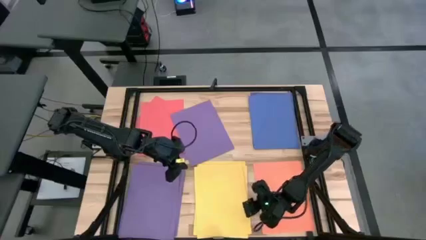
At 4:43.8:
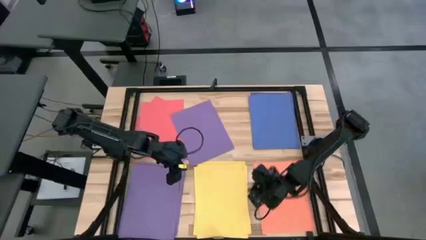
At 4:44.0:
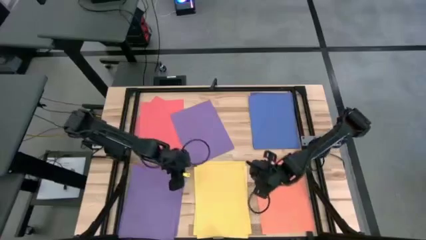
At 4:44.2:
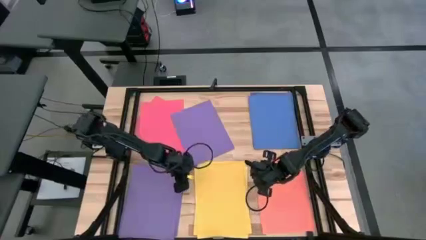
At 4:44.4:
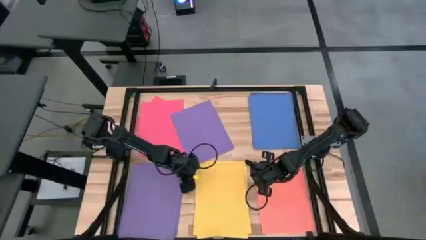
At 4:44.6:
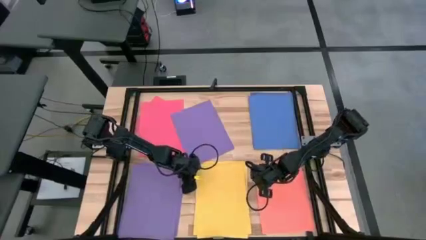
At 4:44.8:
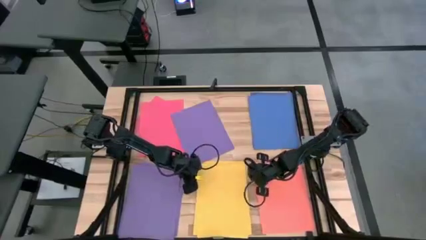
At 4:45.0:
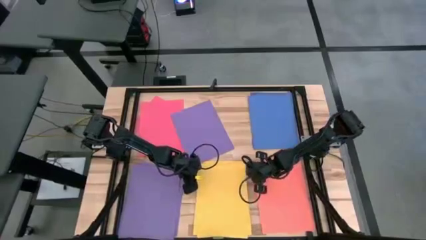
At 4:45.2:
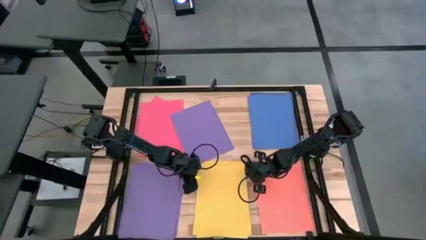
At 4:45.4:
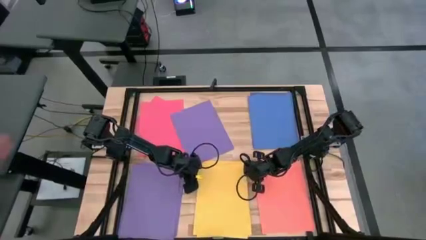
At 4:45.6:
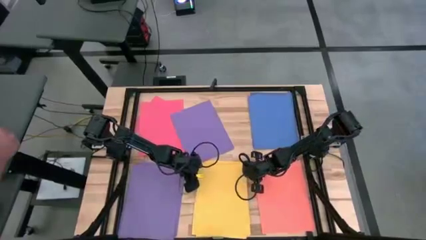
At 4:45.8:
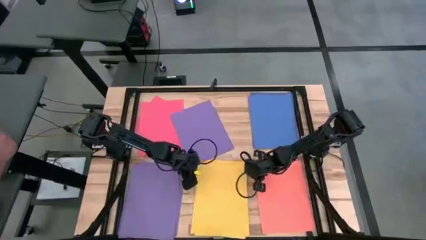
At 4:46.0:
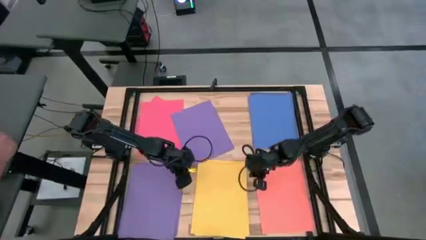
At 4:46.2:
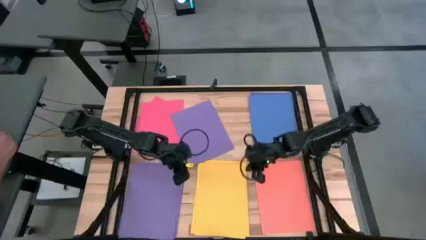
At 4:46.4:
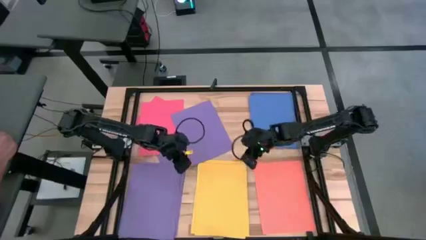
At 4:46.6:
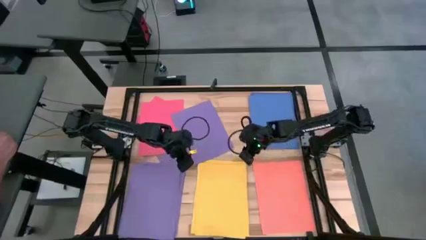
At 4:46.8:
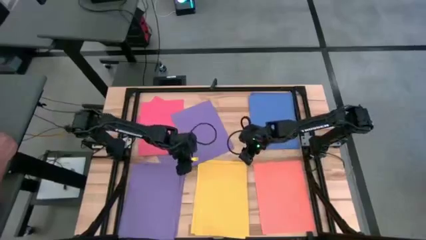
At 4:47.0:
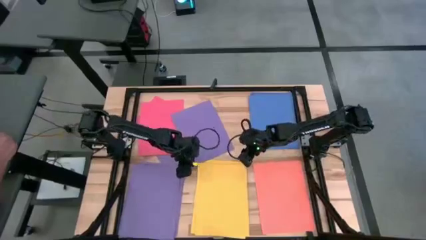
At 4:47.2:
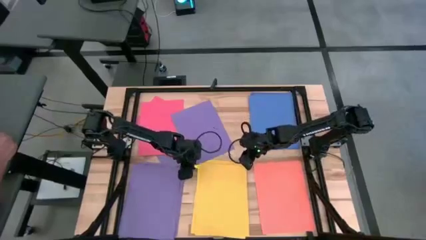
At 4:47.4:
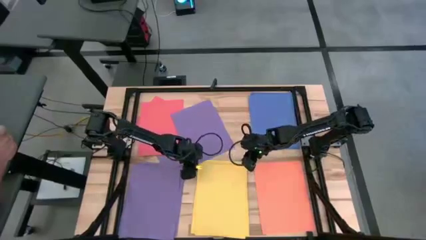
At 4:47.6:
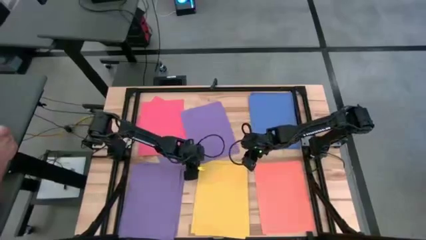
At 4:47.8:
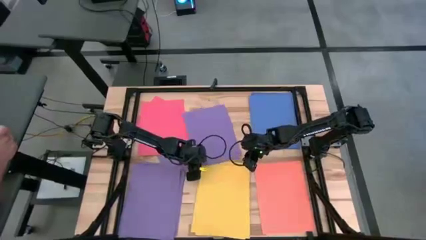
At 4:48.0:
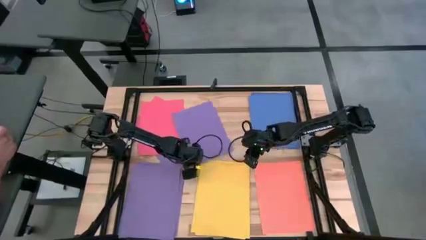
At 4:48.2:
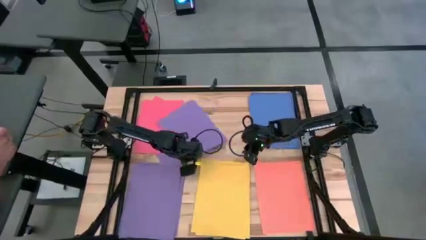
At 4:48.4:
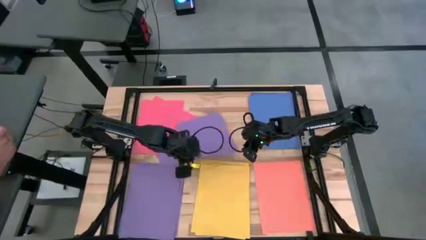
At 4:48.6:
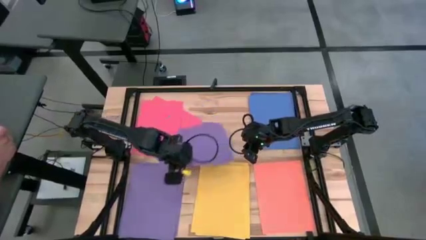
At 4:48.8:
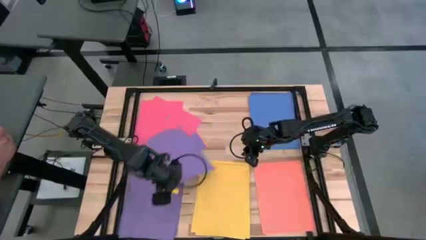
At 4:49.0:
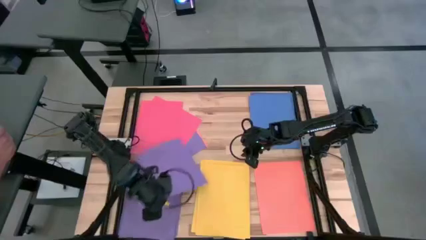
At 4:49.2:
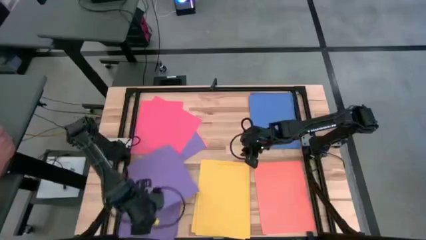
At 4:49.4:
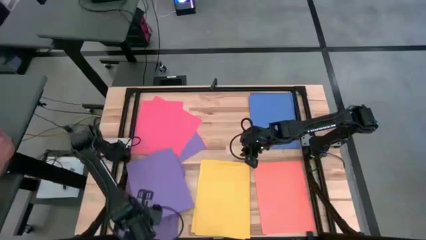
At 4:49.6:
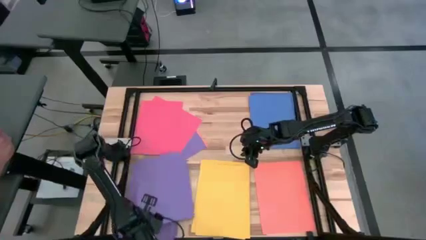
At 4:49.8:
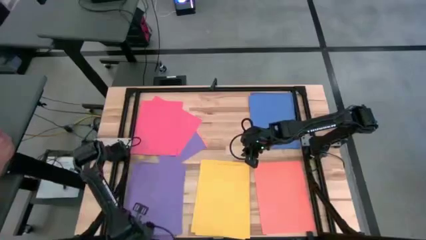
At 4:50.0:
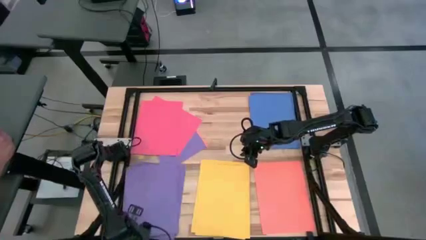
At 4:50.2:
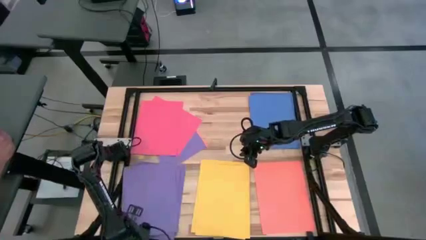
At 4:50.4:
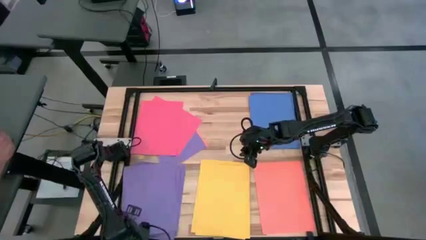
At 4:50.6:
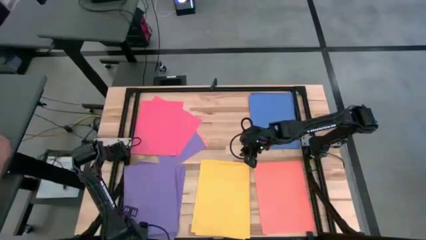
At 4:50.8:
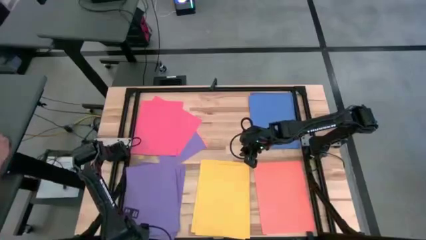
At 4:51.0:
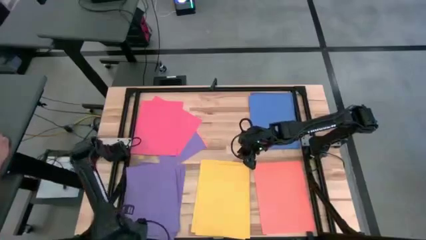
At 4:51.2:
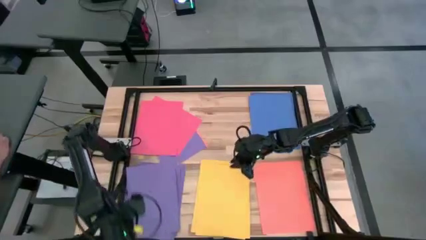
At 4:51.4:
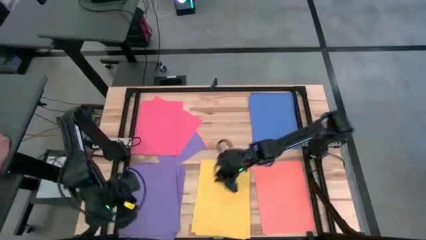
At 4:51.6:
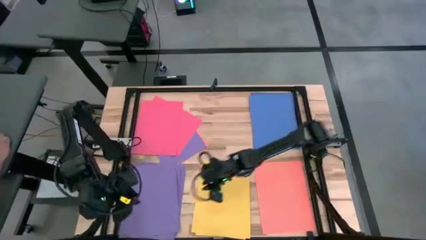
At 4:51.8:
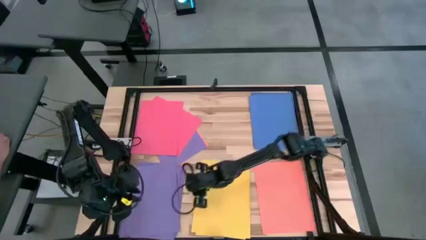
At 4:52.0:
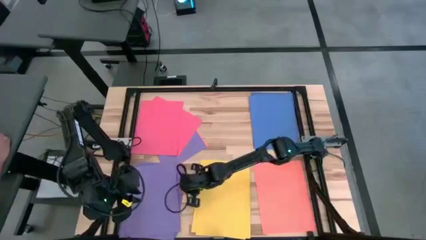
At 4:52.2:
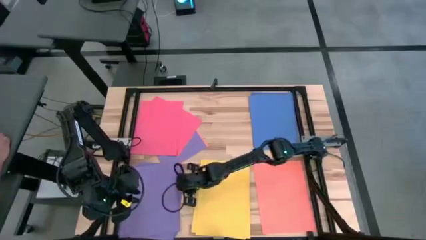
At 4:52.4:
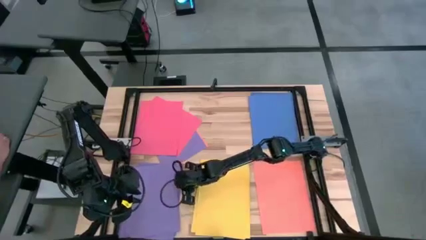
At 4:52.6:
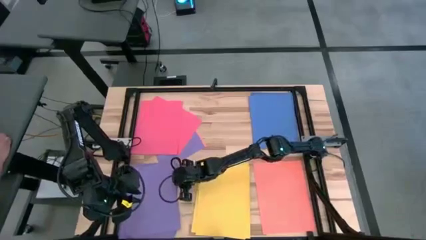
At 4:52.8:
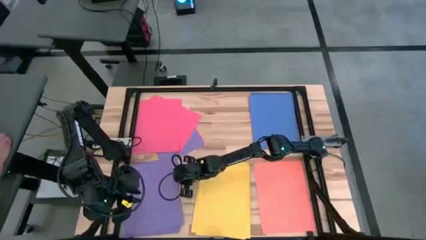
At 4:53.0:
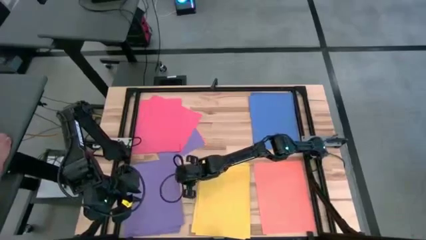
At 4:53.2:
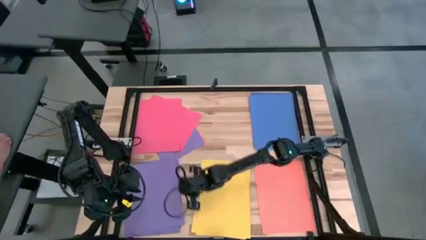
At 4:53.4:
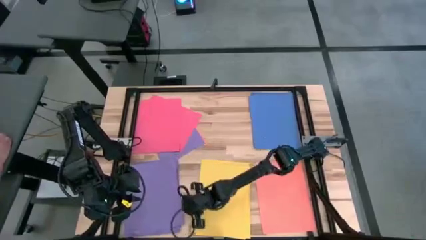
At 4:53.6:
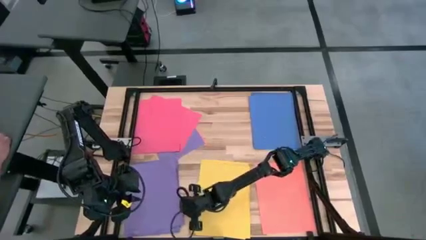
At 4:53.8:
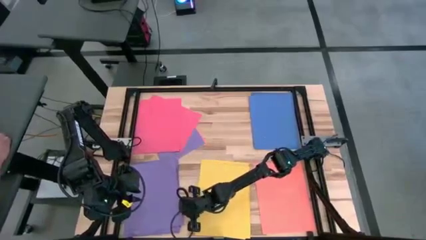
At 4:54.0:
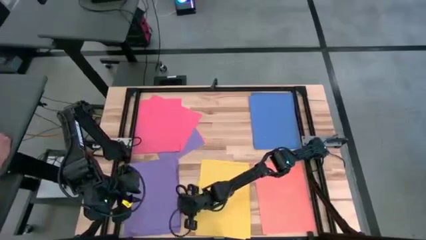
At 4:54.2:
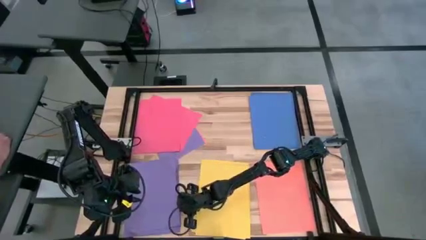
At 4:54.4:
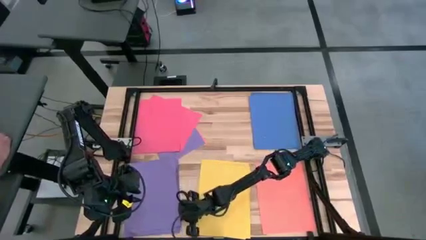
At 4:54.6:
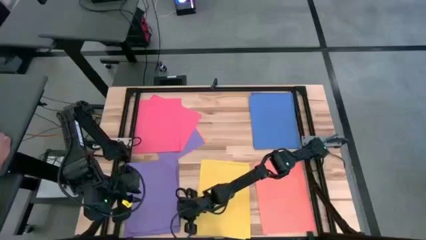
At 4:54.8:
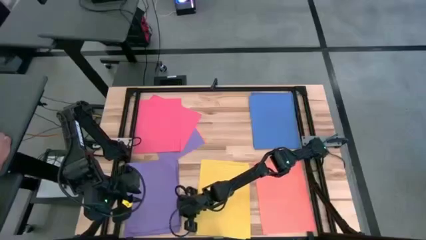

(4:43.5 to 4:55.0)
Task: Organize paper
Stack the purple paper on top of the purple paper

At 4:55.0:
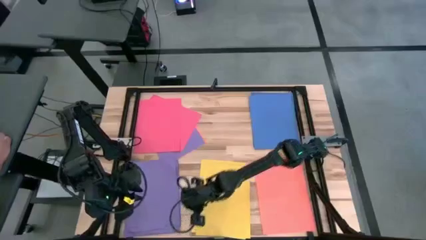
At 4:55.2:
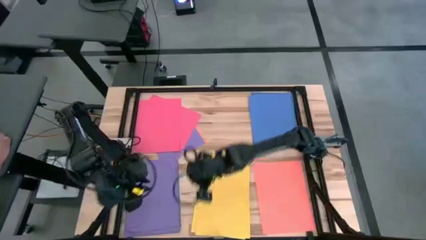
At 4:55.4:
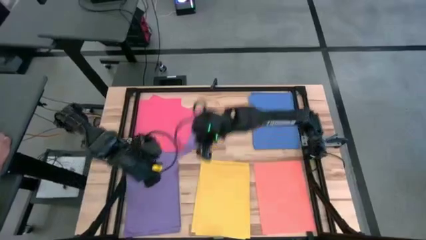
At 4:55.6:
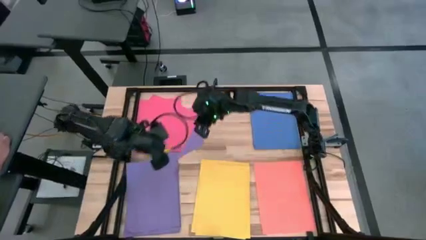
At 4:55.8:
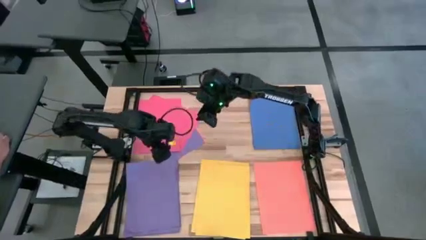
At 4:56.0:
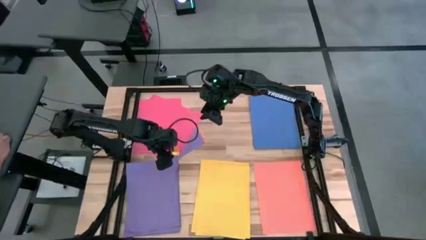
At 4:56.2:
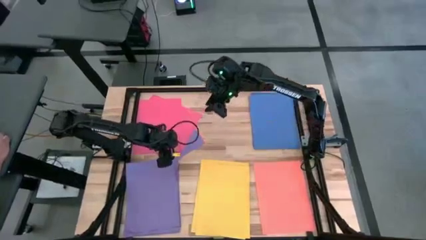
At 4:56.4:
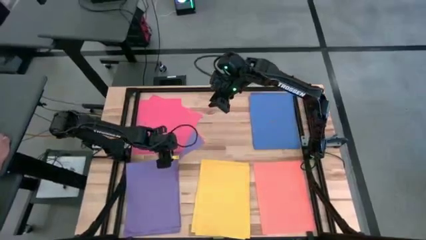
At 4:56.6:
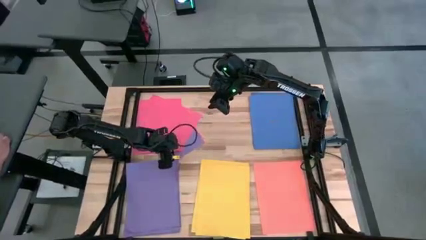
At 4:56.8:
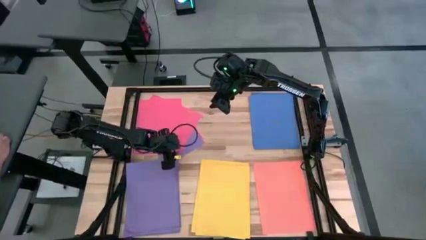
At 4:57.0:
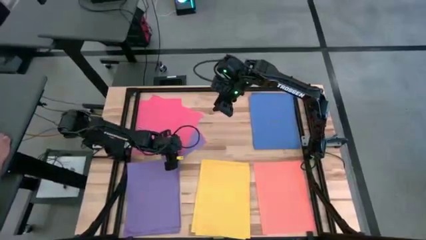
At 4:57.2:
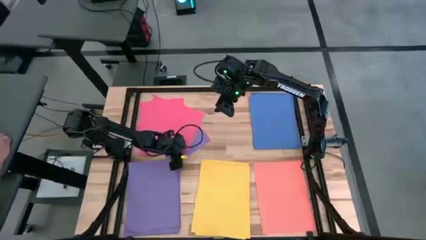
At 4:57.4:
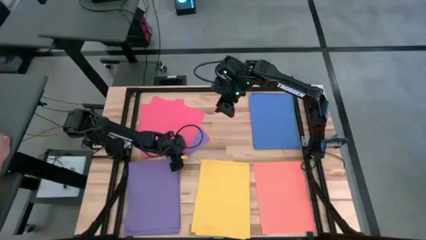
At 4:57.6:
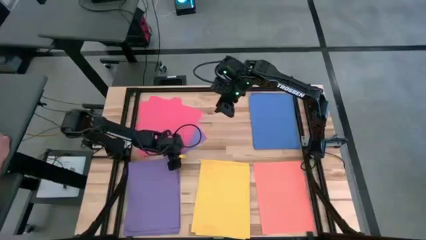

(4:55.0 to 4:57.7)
Put the pink paper to the top center of the table
